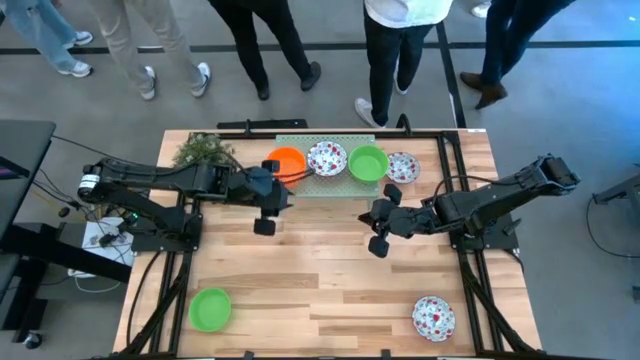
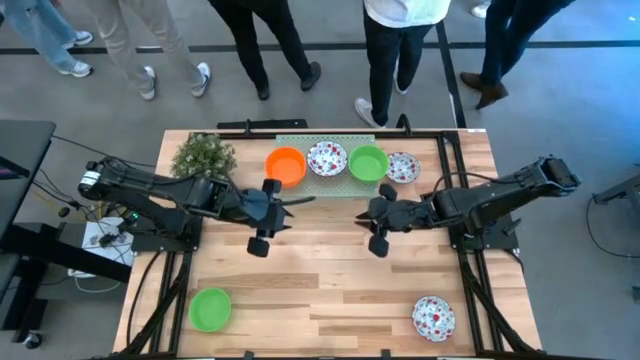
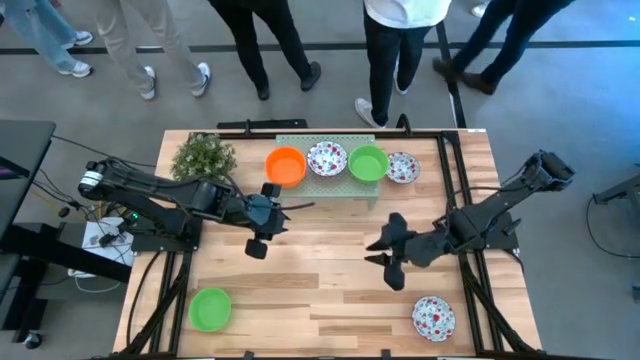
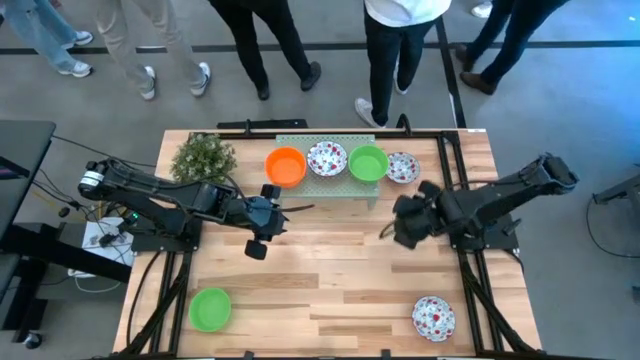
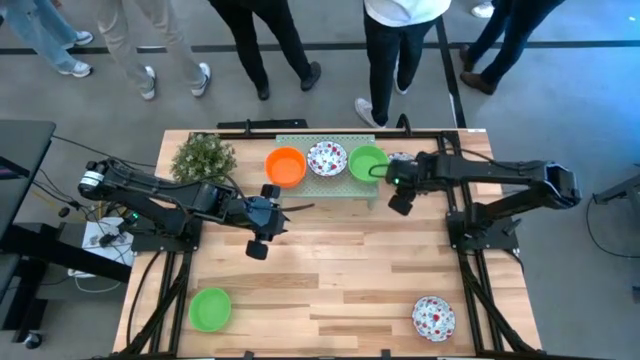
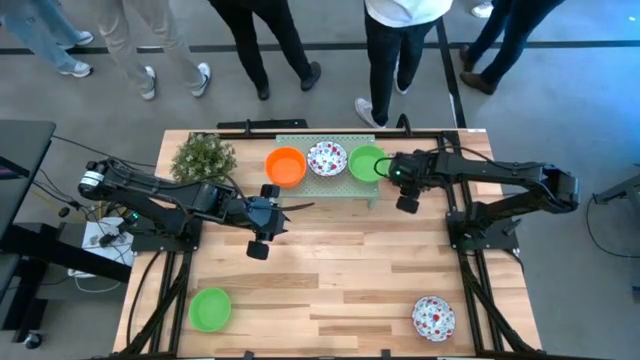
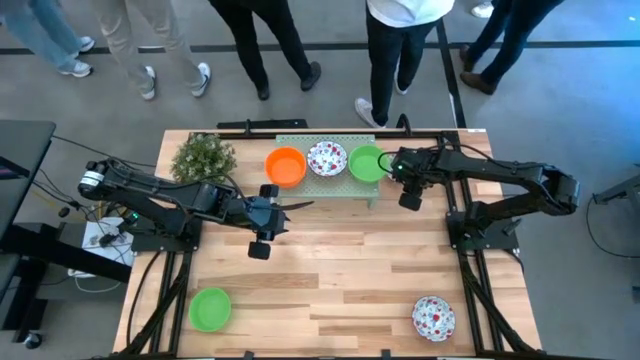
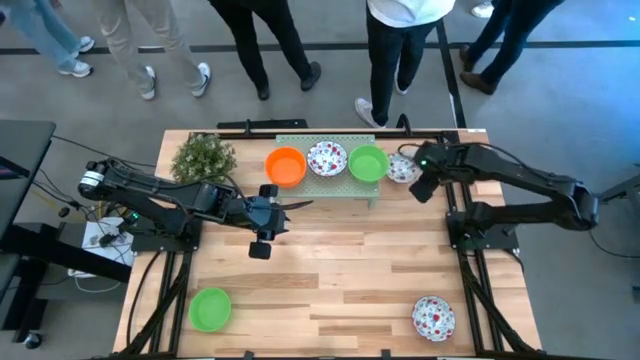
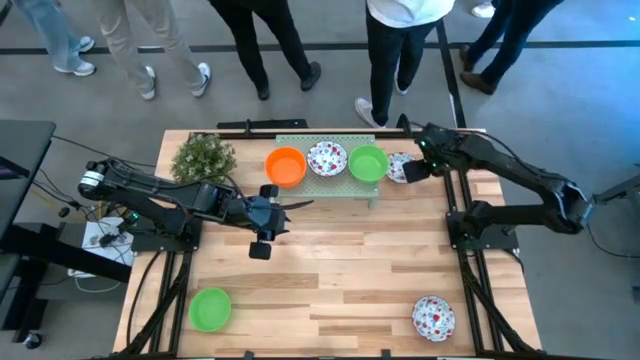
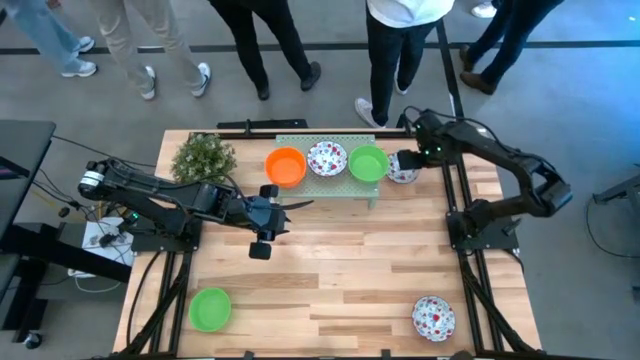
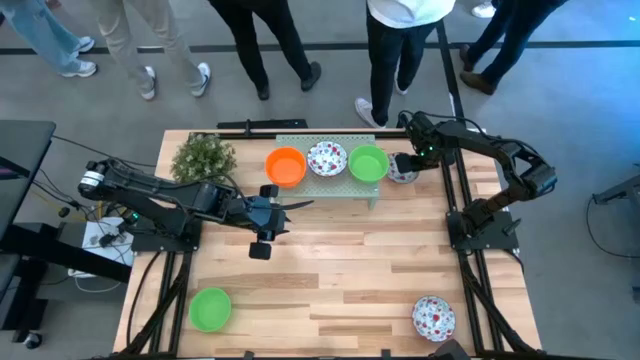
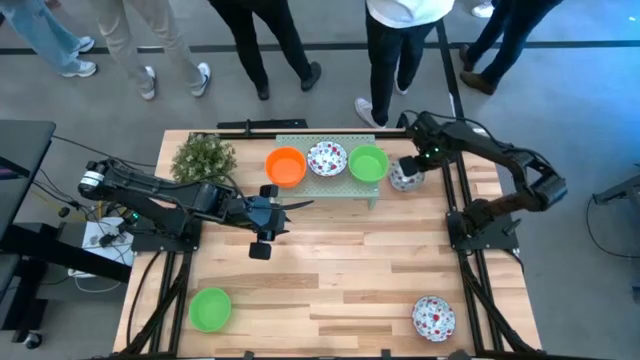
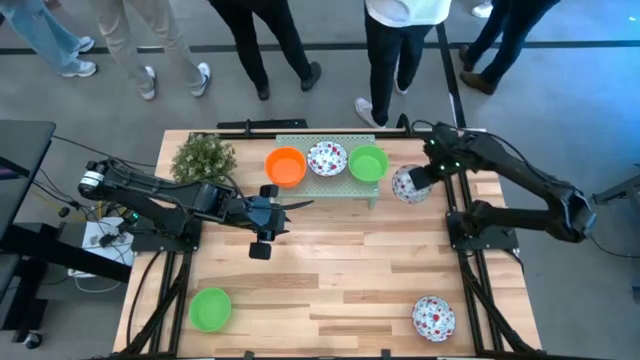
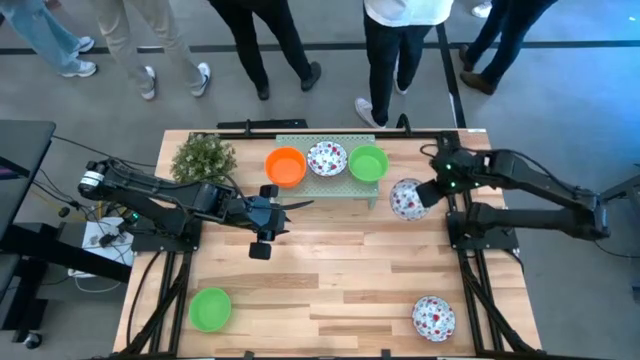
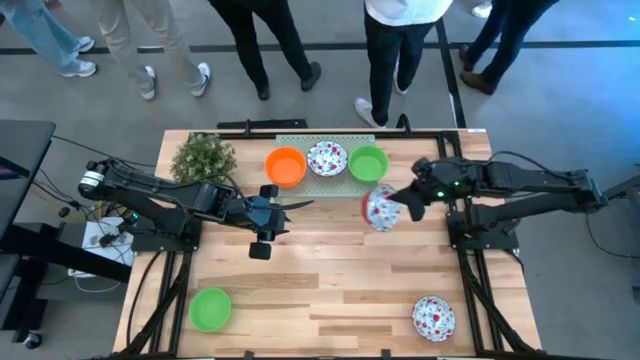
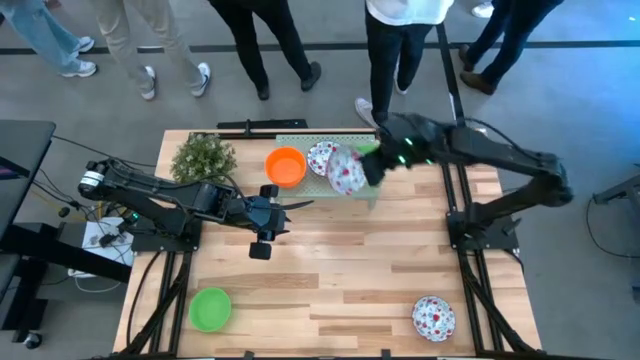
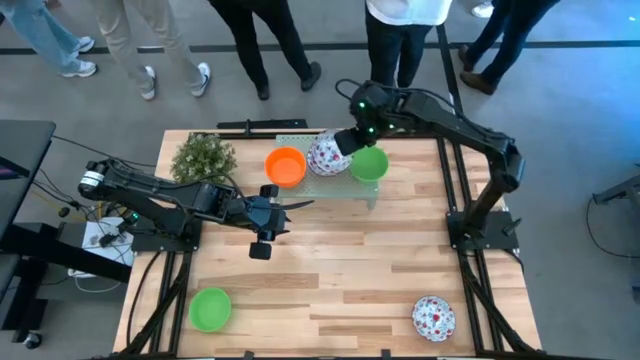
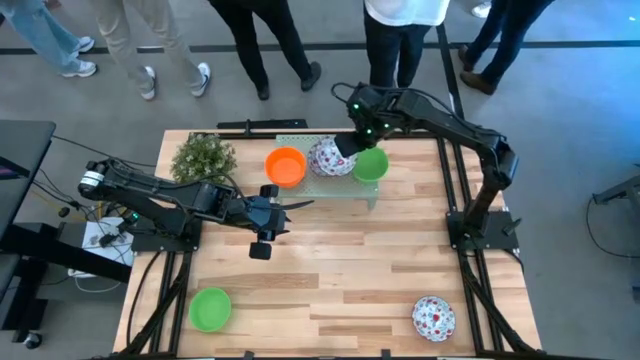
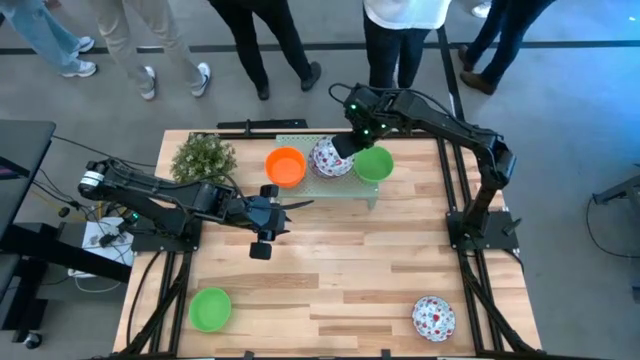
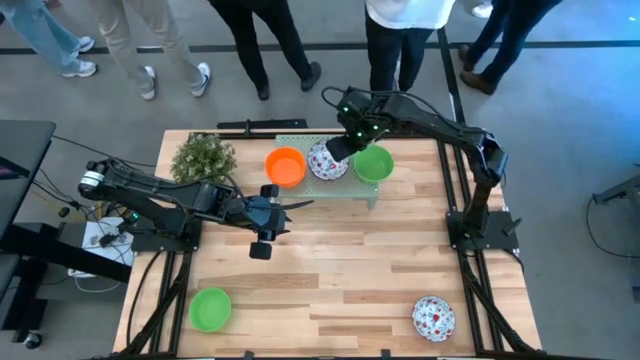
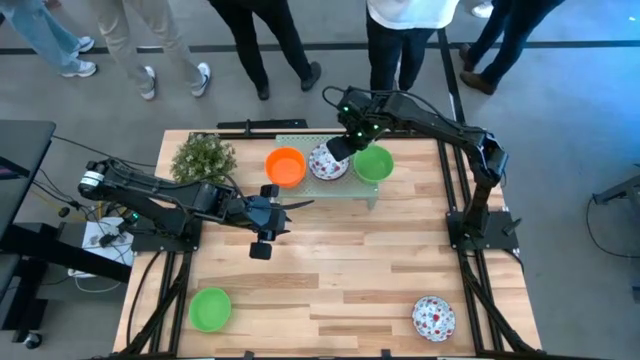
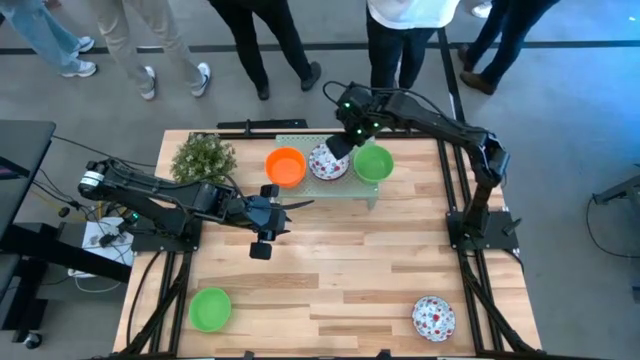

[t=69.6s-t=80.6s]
Task: Pick & Place Mini bowls
Stack the top red patterned bowl onto the other red patterned bowl on the shelf

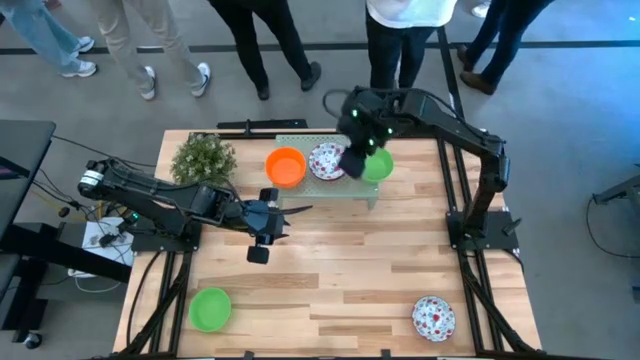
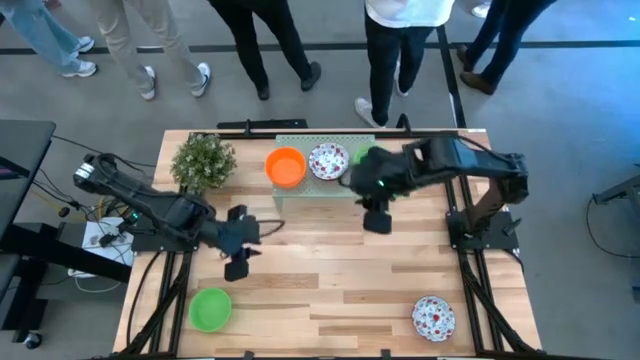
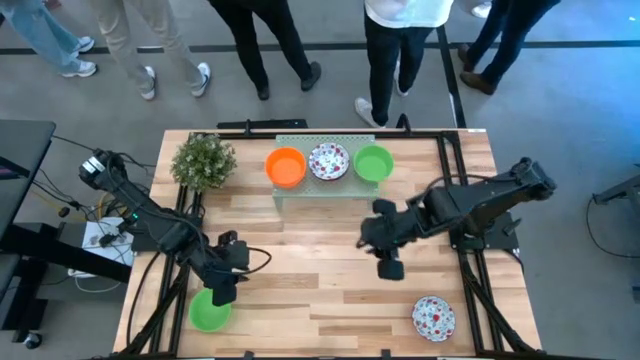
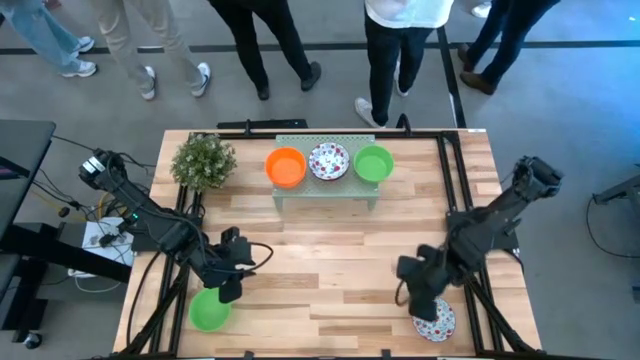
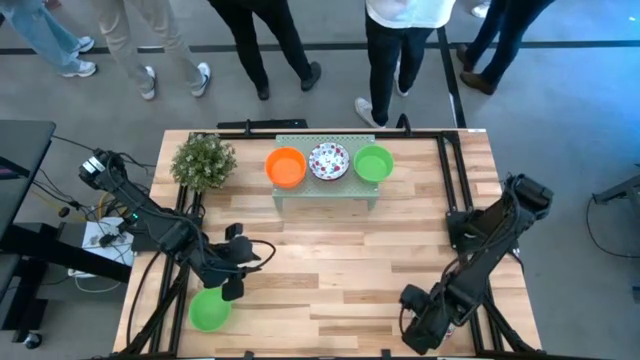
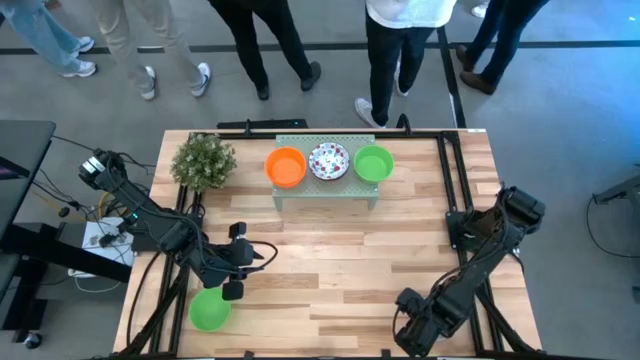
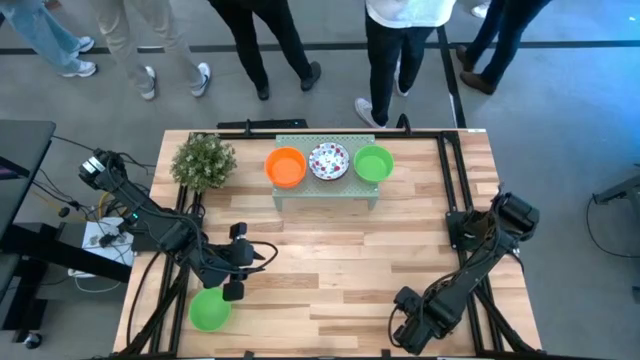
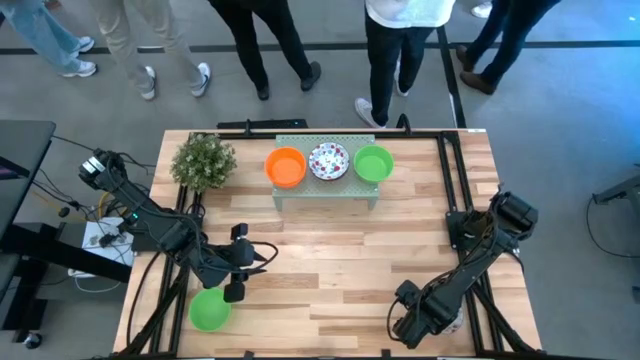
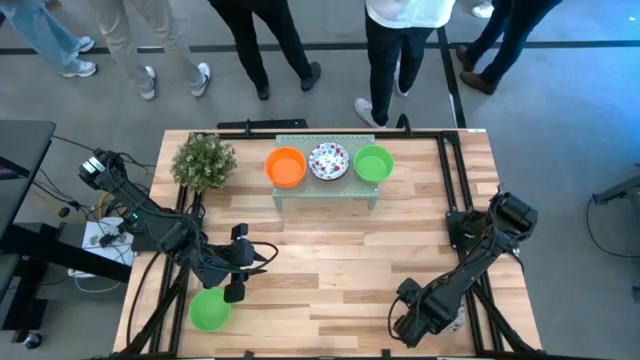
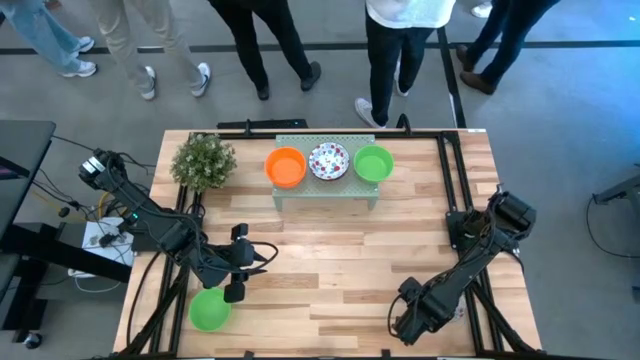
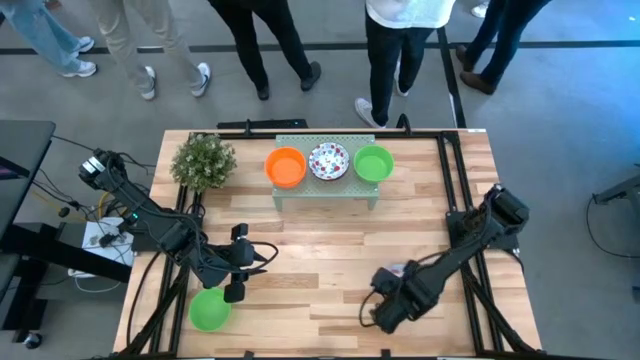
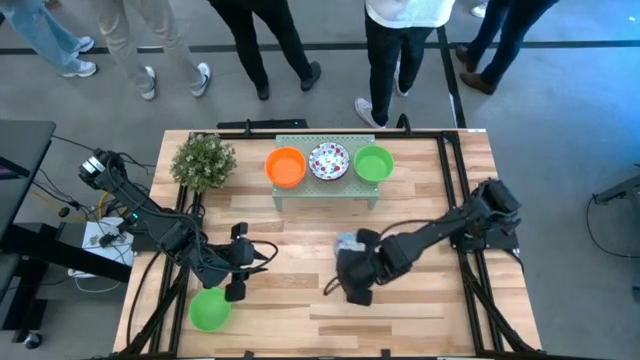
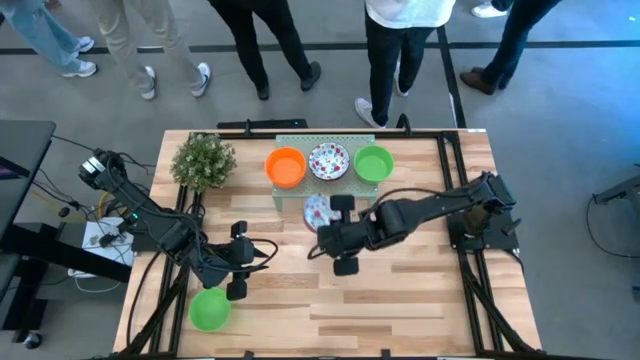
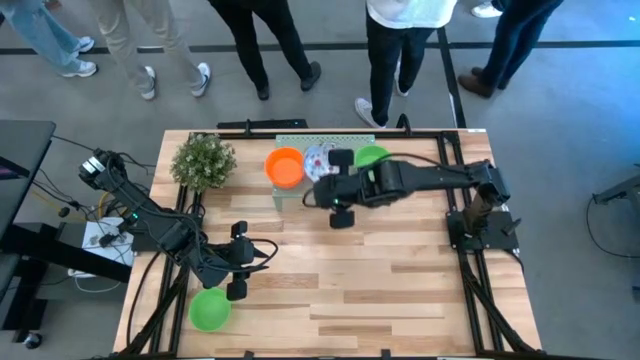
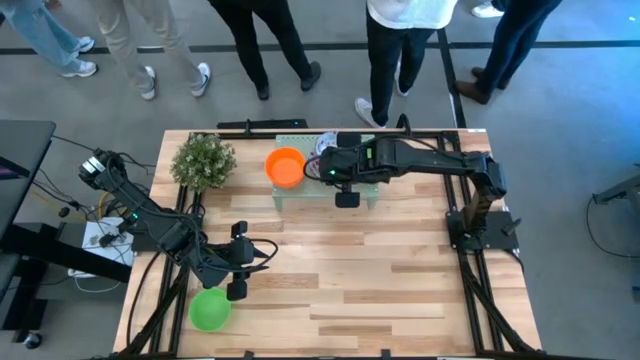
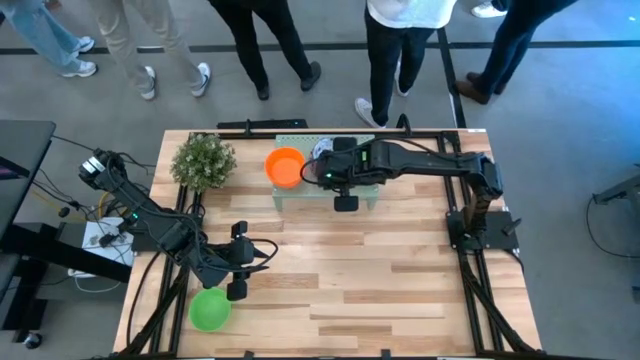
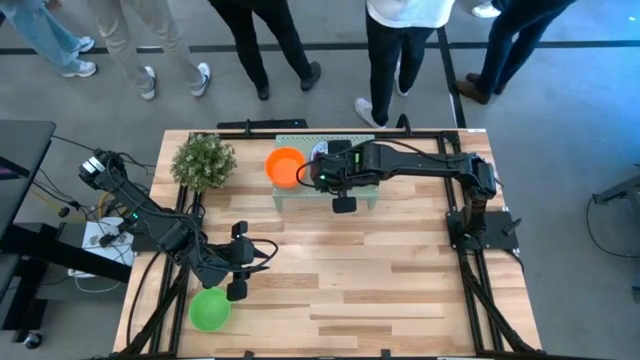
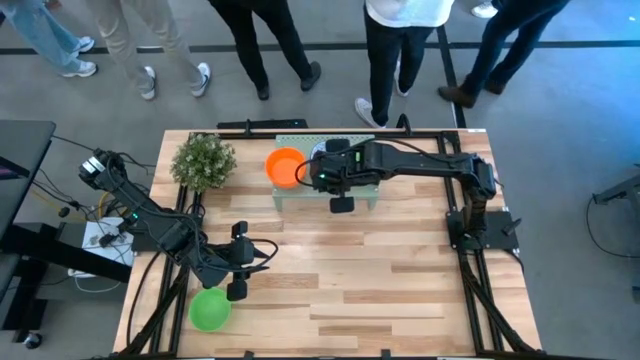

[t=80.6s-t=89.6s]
Stack the red patterned bowl onto the stacked red patterned bowls on the shelf

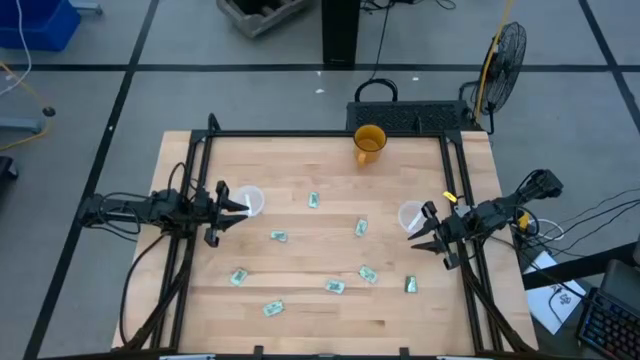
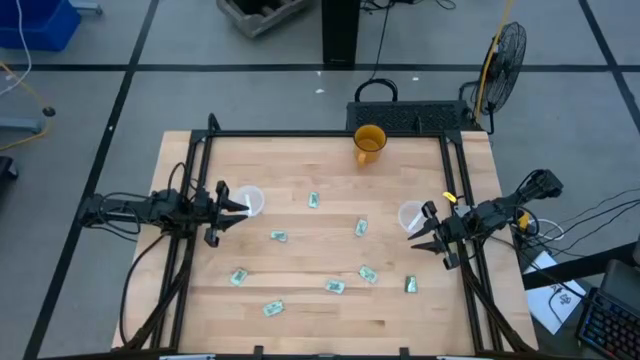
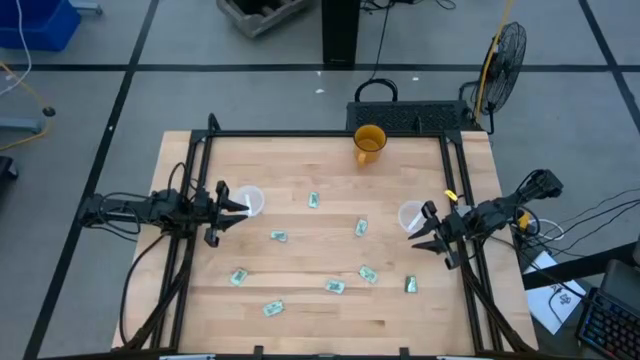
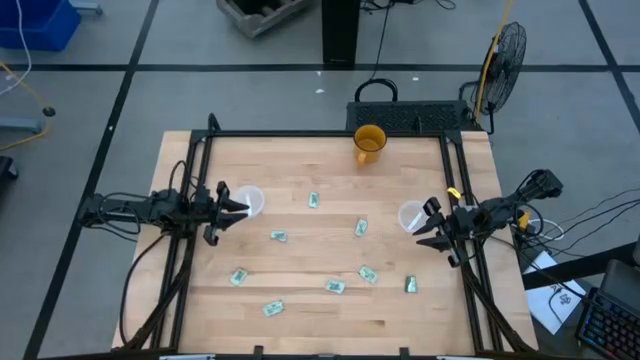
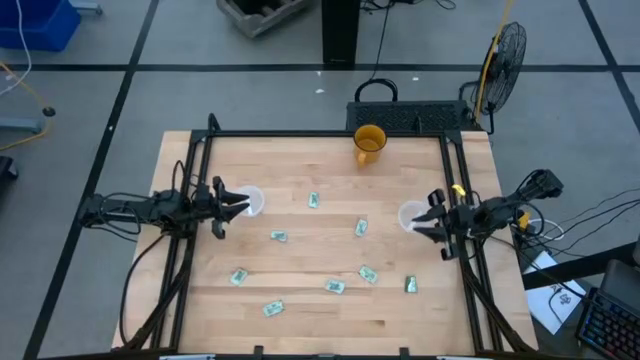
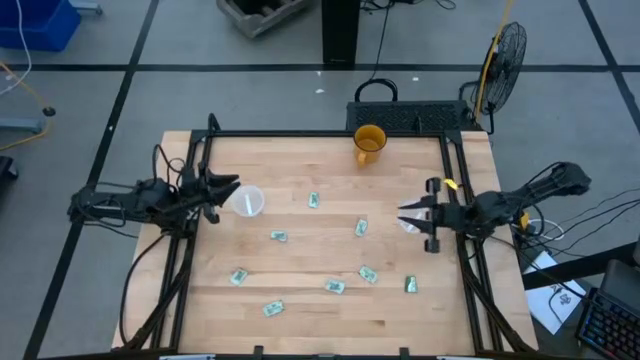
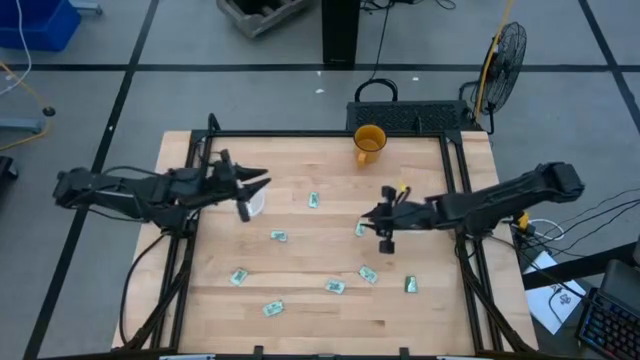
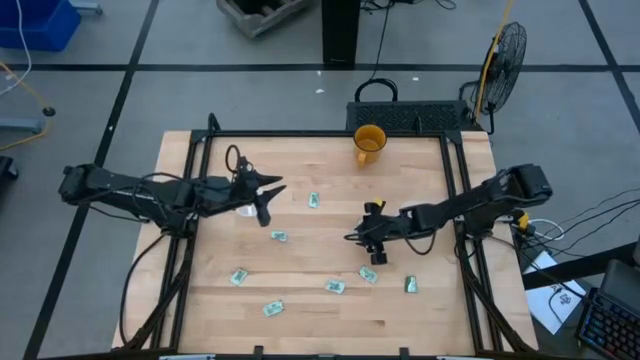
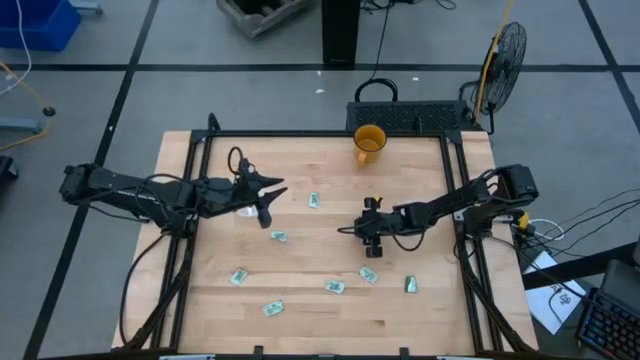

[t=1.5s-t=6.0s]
Task: Pick and place Stevia / Truvia into bins
Put the stevia packet into the right transparent container
